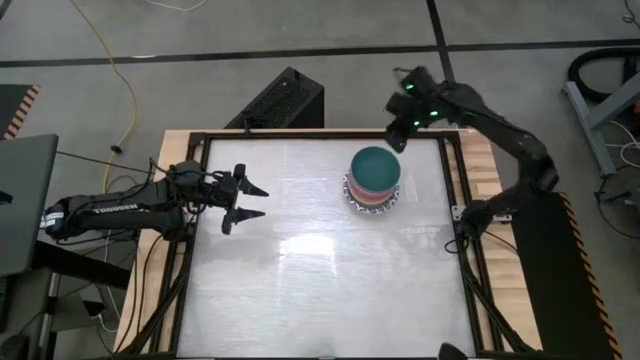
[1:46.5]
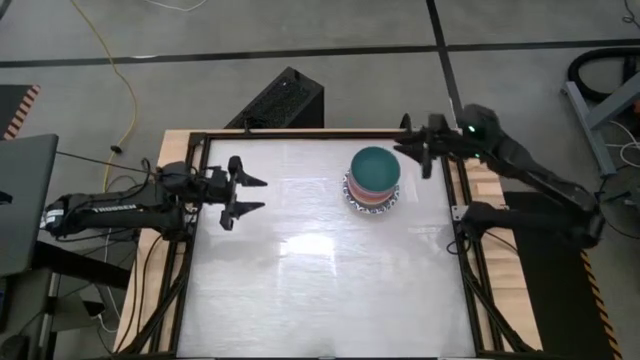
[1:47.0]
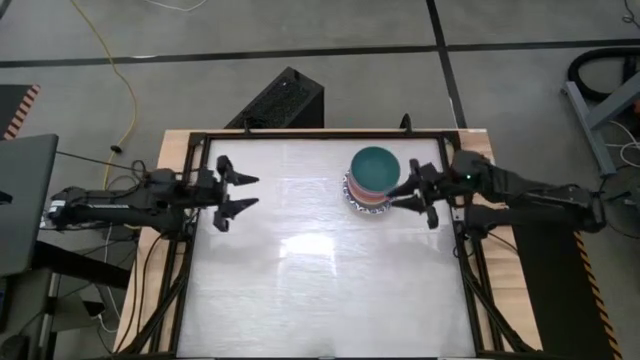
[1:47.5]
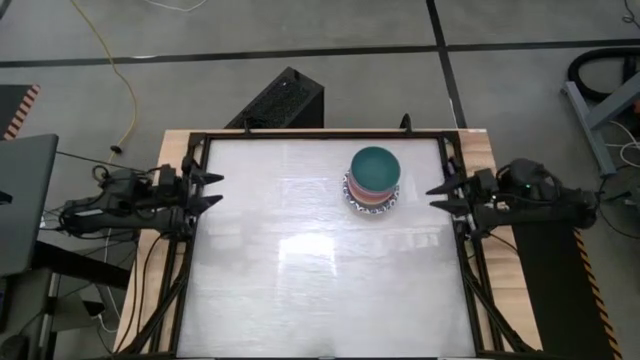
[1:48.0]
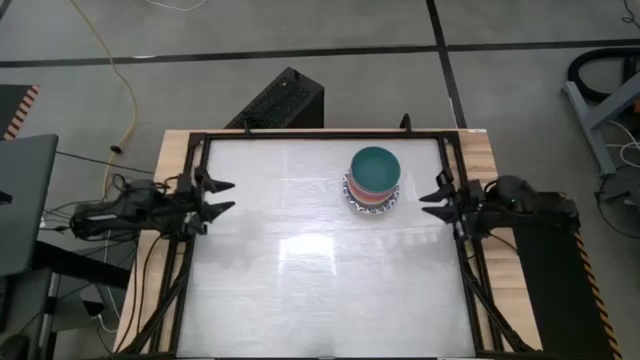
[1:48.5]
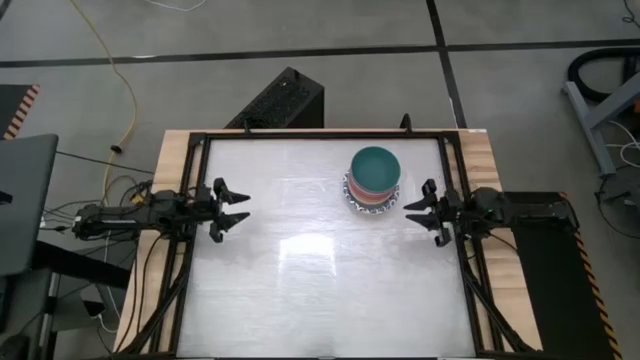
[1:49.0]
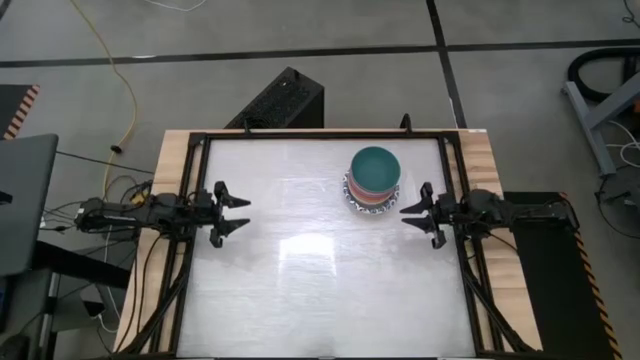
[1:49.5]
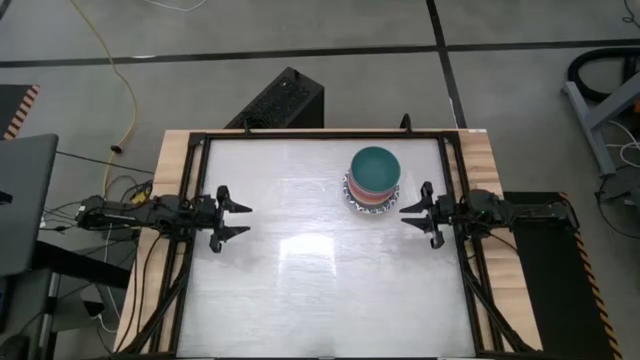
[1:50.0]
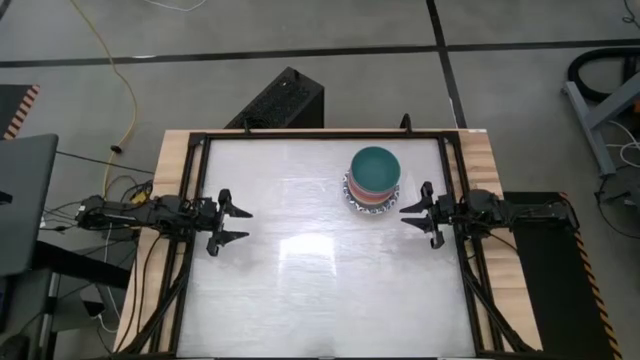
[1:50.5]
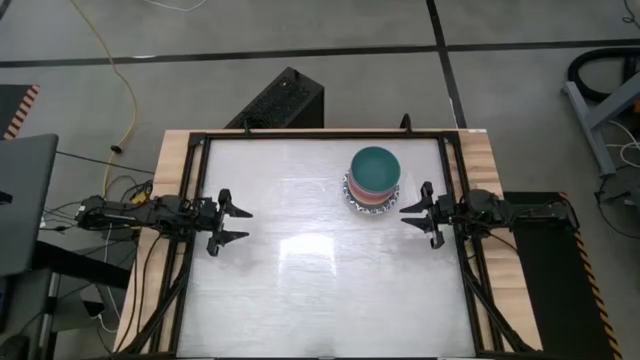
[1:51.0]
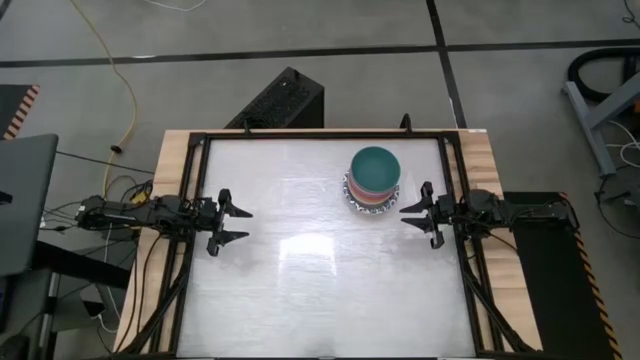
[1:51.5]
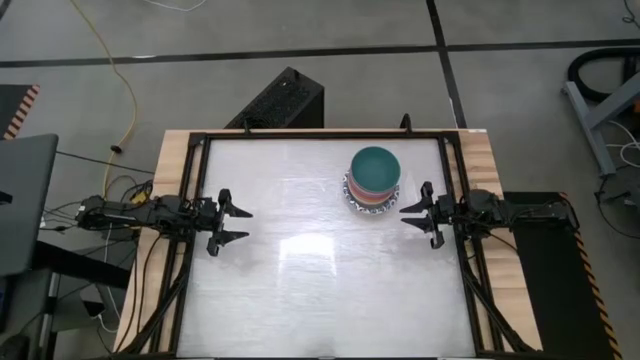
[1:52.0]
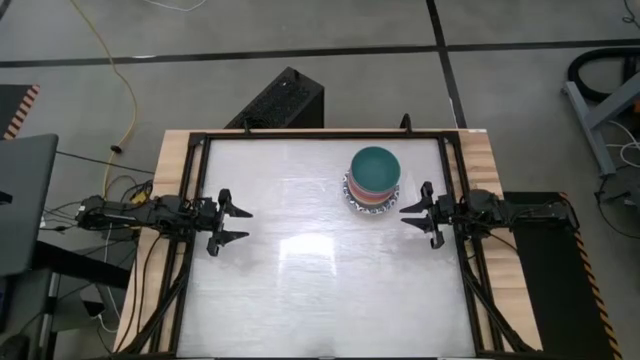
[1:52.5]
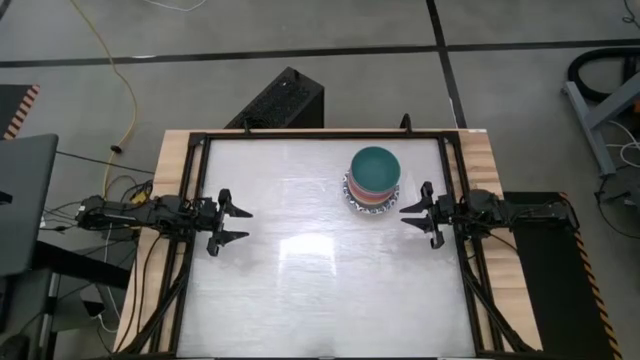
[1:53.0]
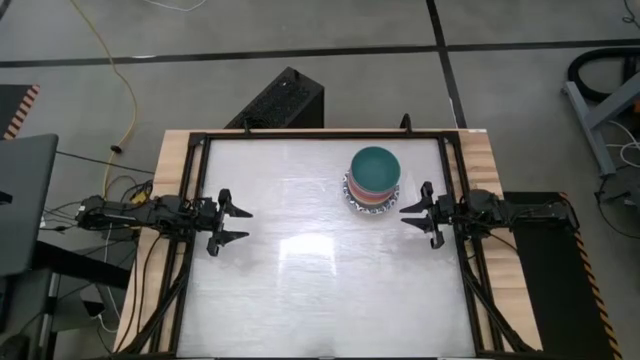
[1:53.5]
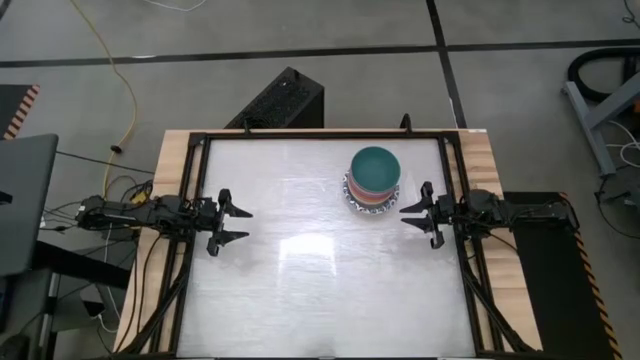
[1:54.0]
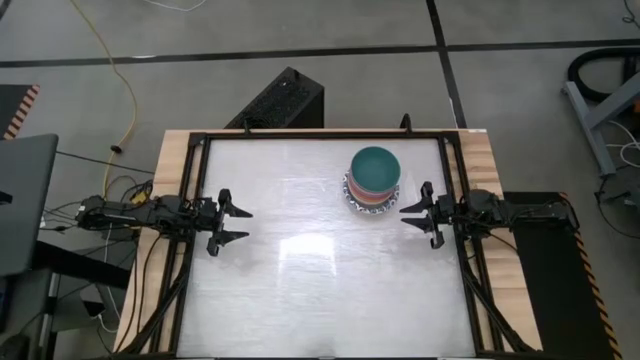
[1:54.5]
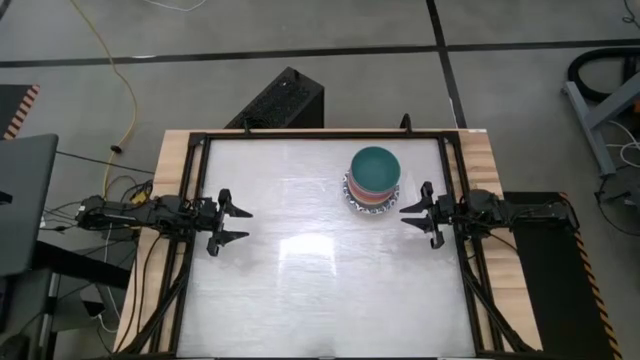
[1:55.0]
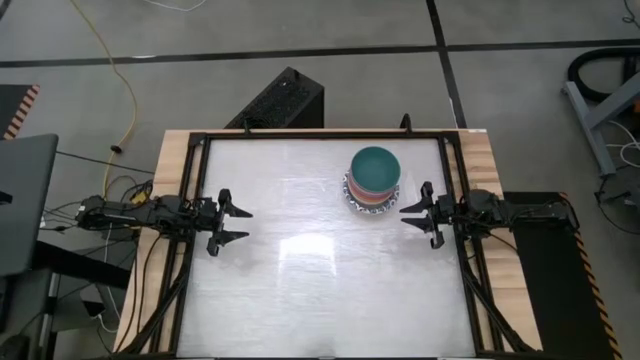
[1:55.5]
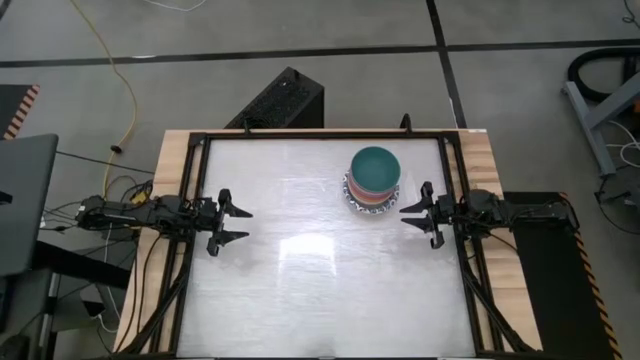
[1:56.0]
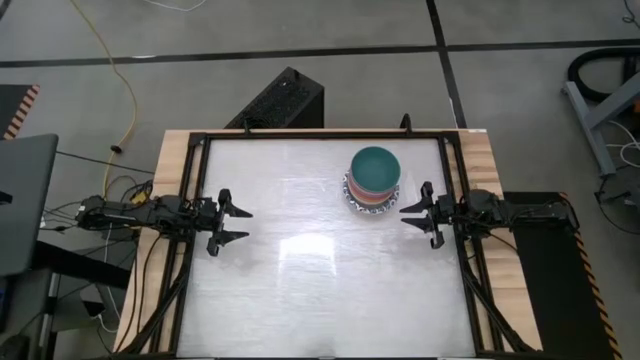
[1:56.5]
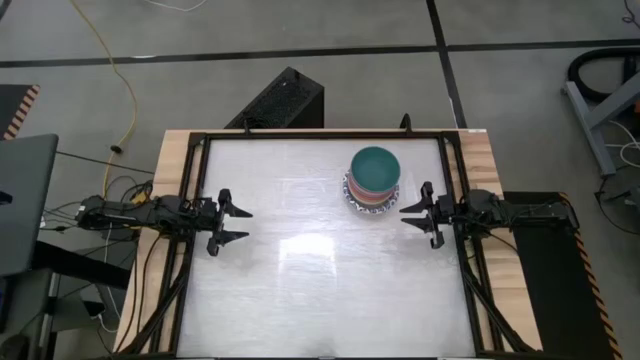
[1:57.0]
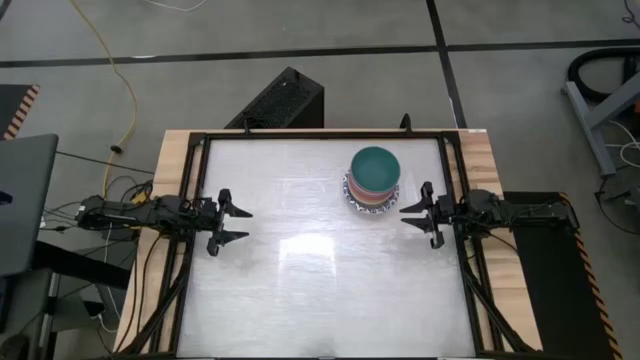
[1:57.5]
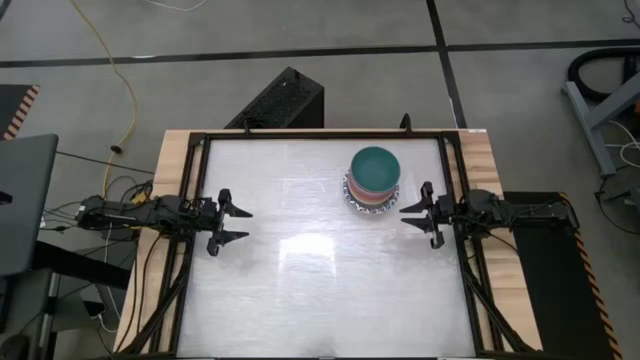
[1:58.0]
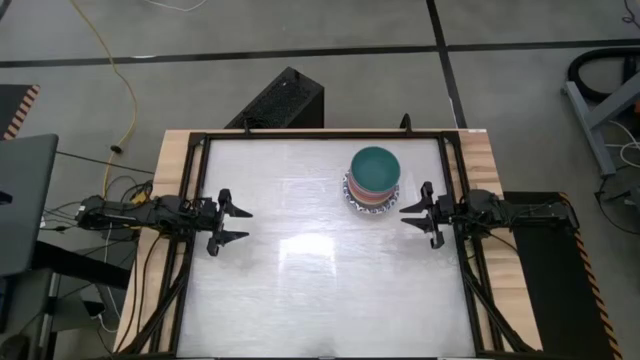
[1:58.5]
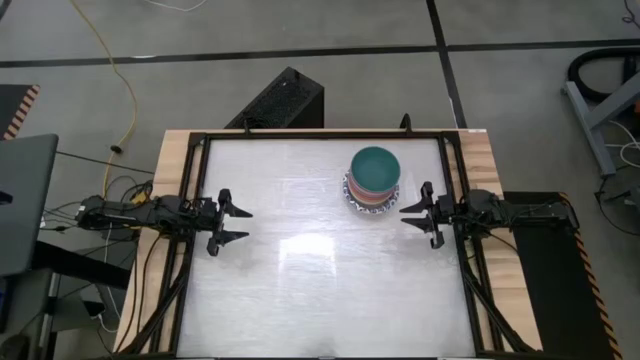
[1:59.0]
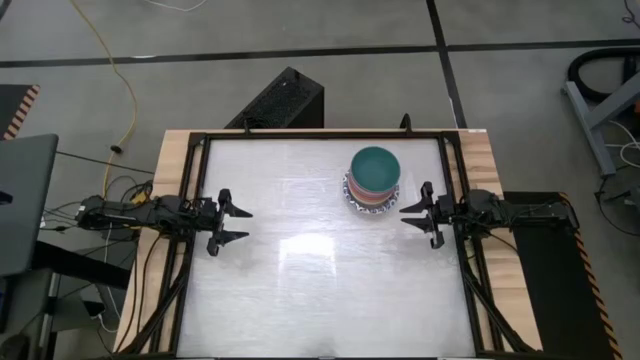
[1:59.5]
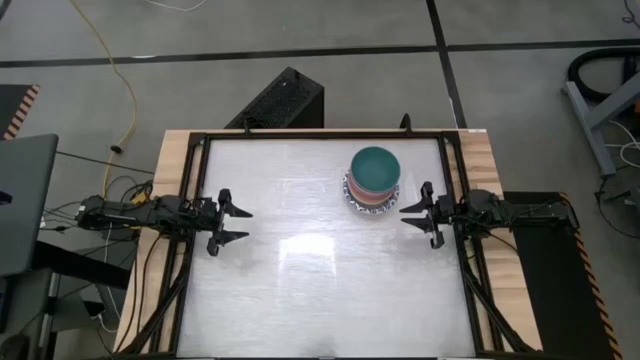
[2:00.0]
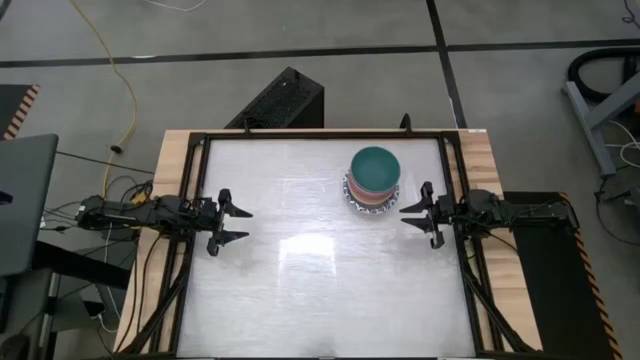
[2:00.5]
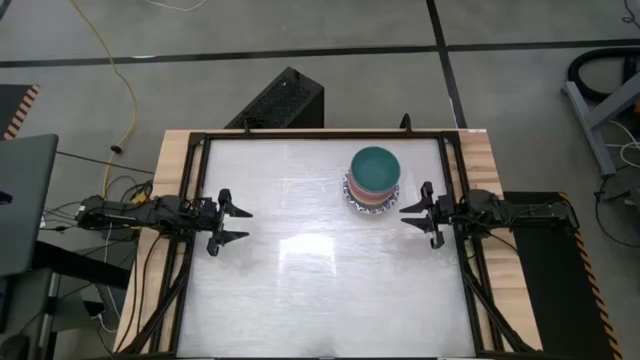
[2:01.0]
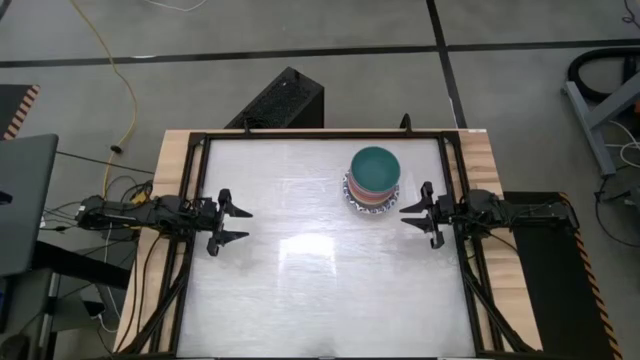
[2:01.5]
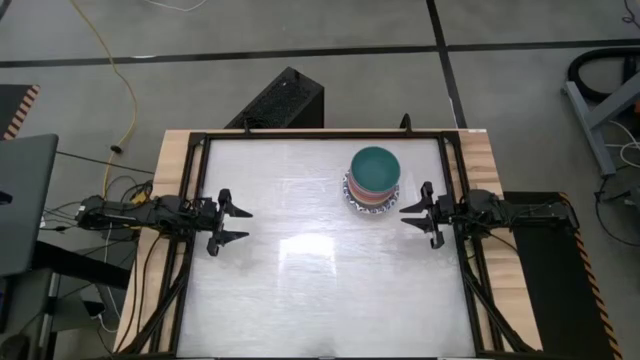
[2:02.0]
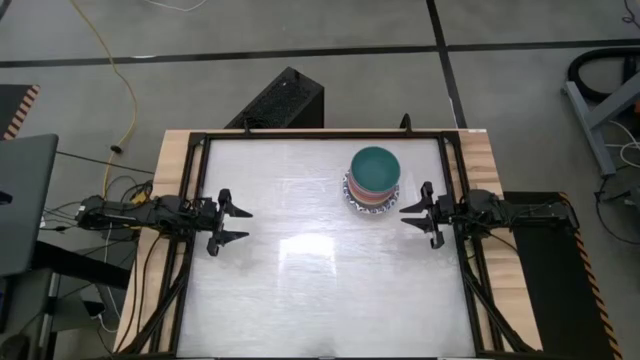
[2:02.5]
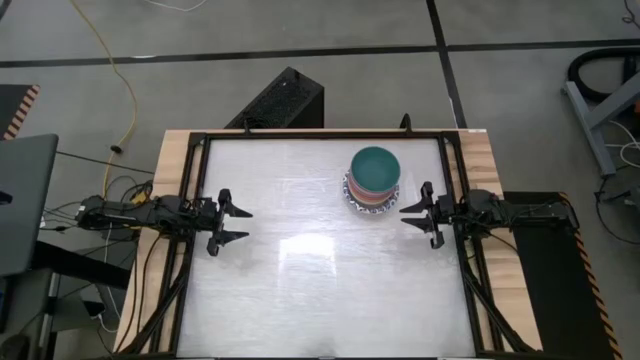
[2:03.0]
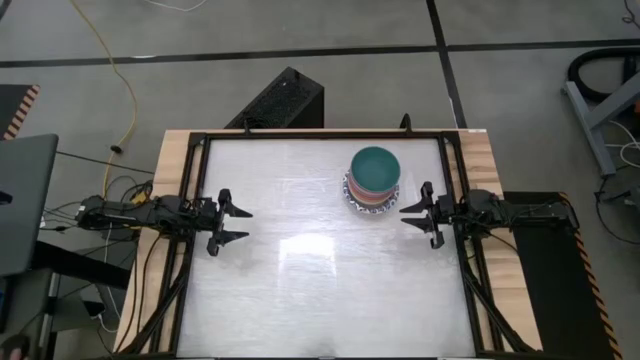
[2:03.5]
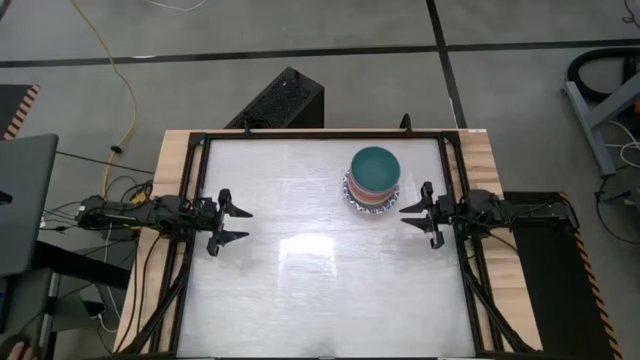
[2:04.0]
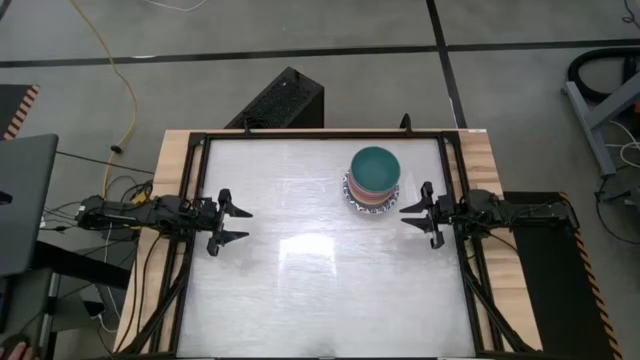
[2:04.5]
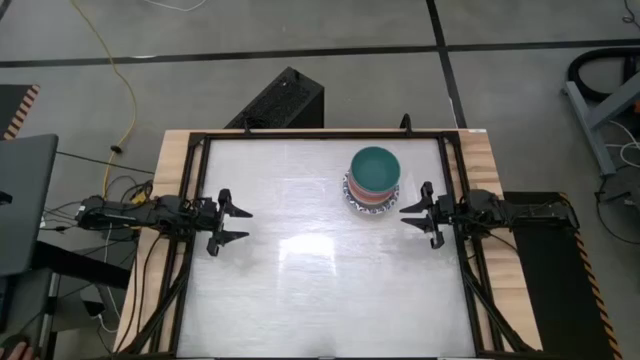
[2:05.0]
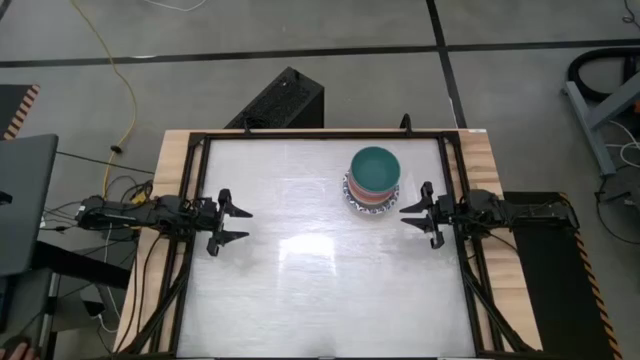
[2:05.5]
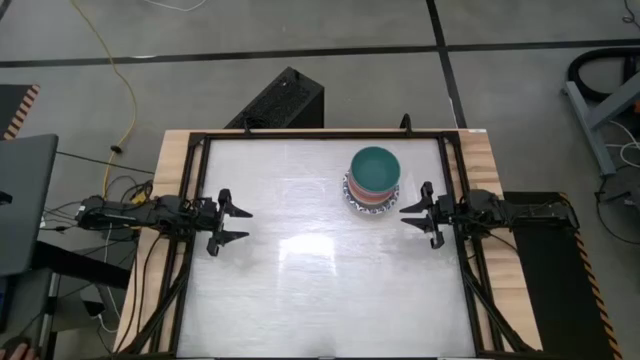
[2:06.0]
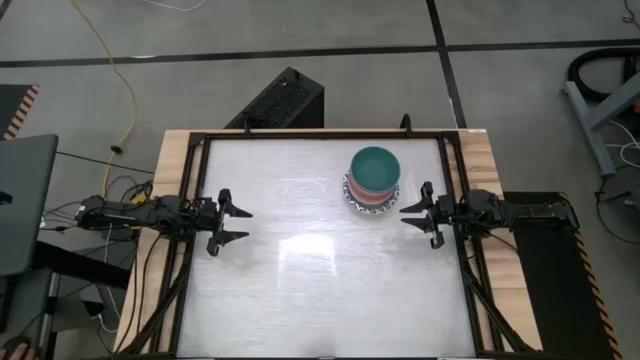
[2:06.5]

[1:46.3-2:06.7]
Return to Home Position
